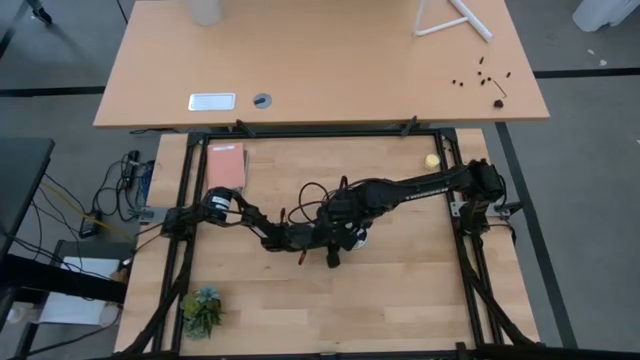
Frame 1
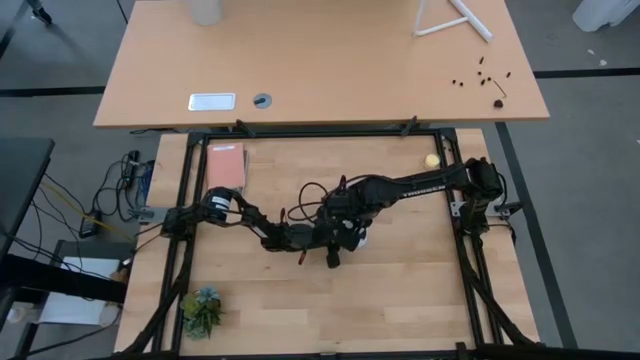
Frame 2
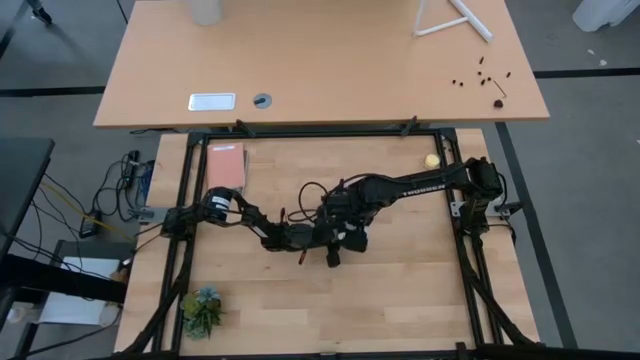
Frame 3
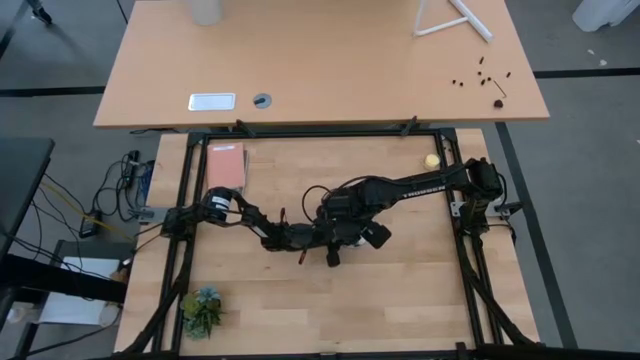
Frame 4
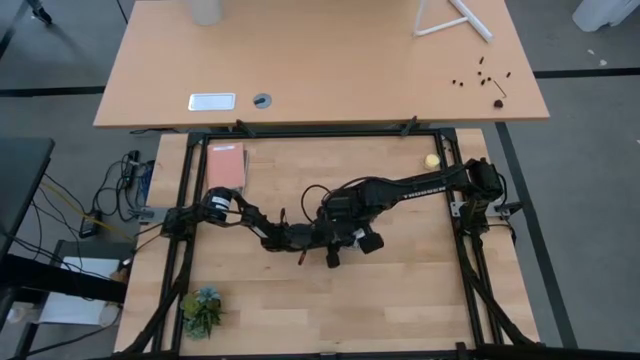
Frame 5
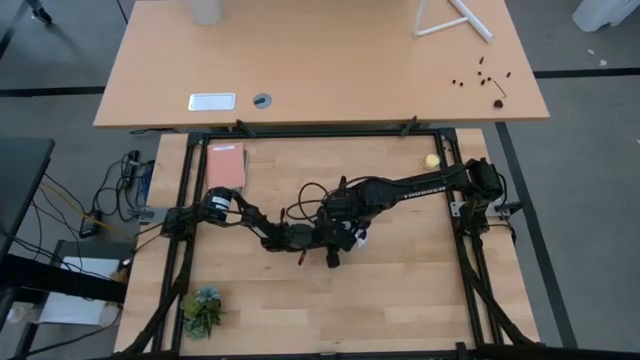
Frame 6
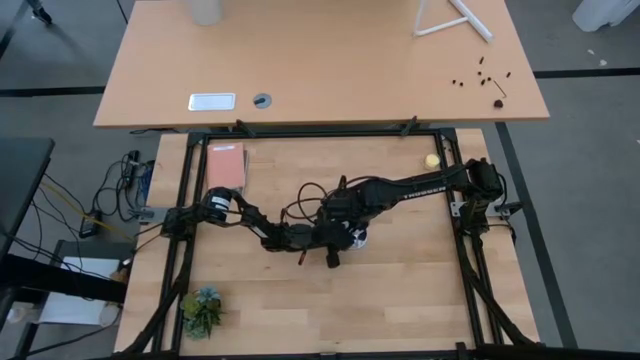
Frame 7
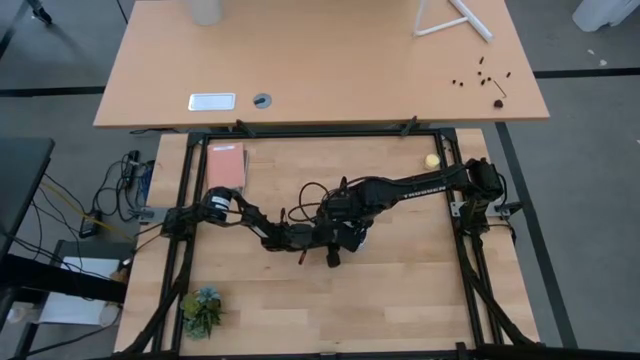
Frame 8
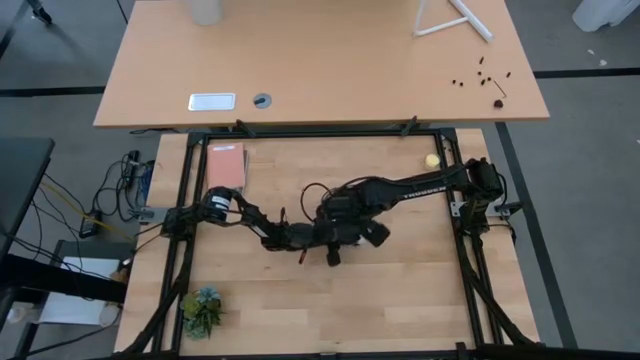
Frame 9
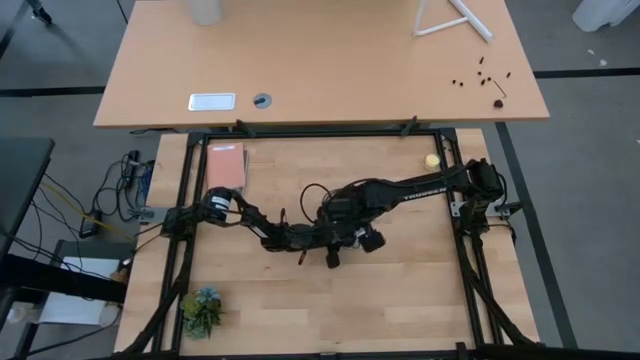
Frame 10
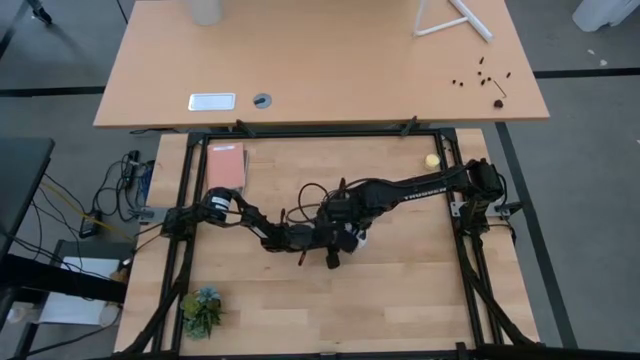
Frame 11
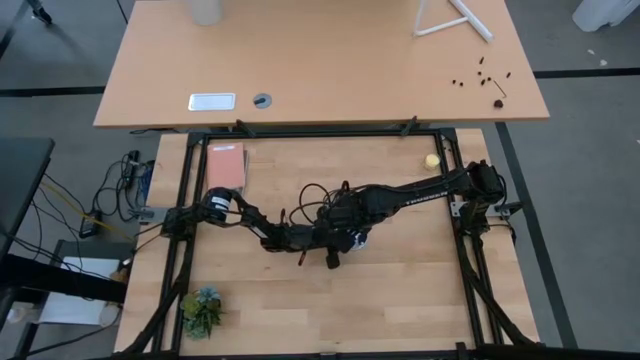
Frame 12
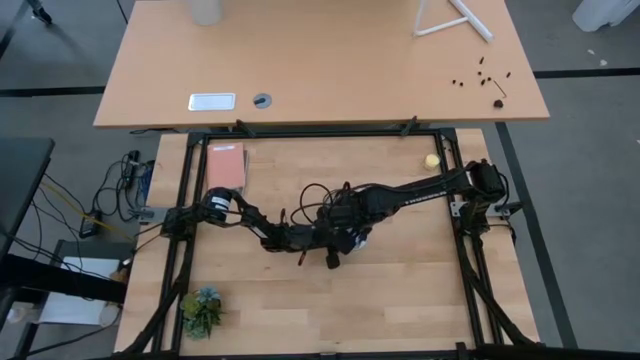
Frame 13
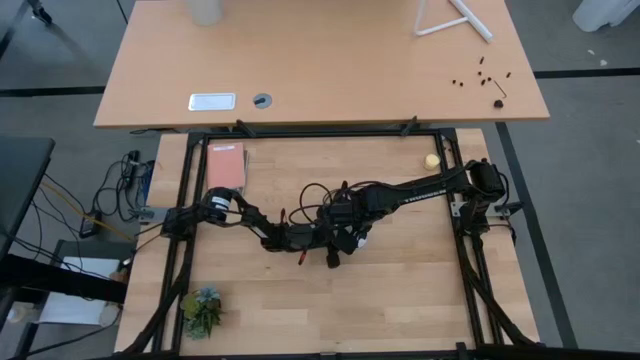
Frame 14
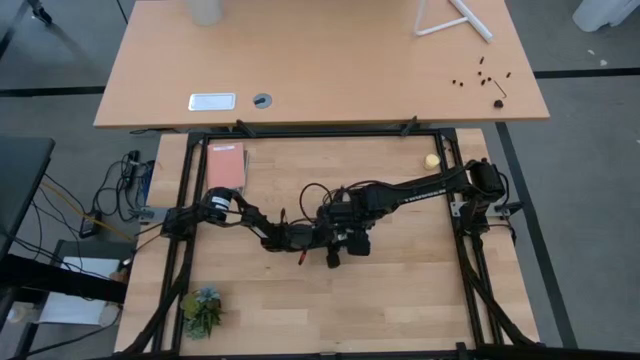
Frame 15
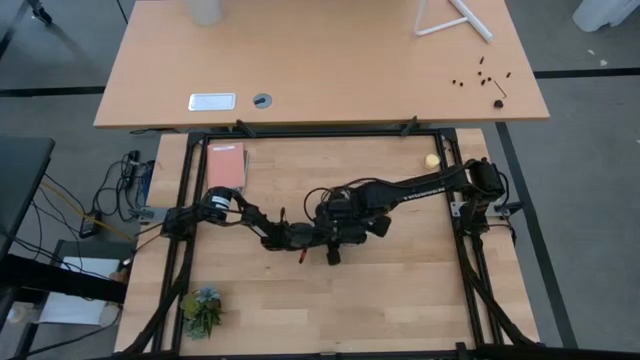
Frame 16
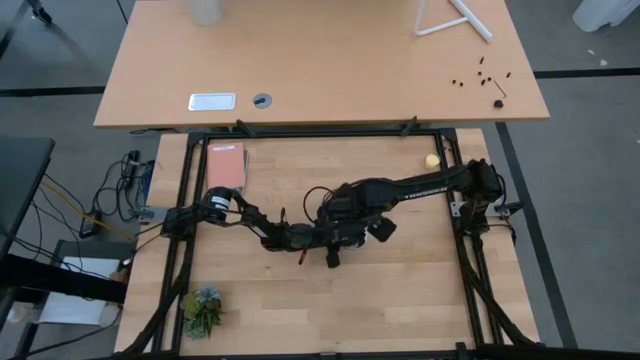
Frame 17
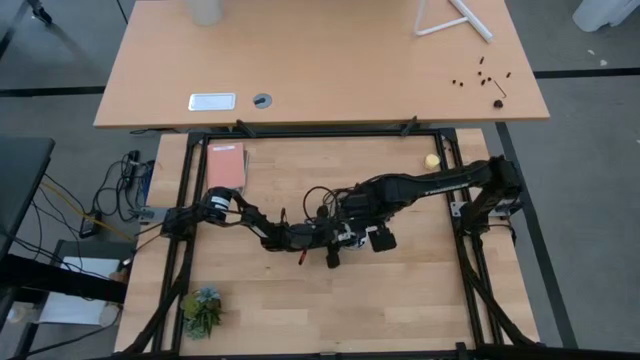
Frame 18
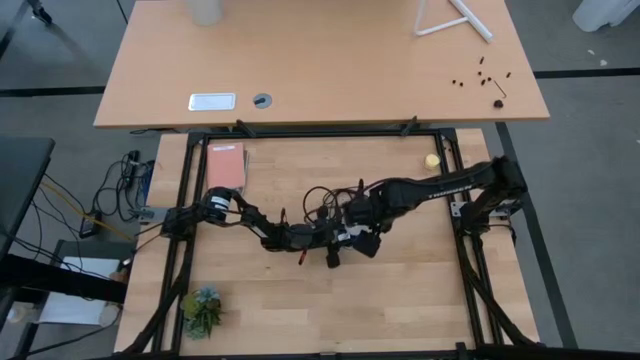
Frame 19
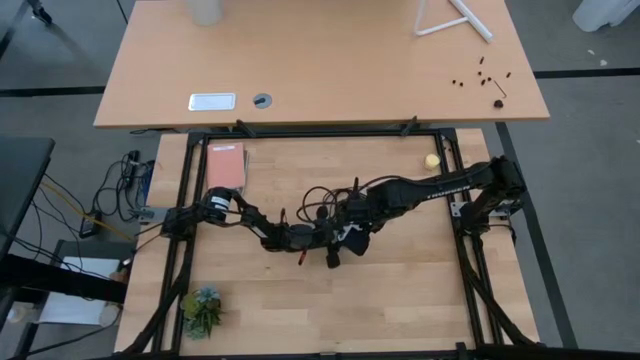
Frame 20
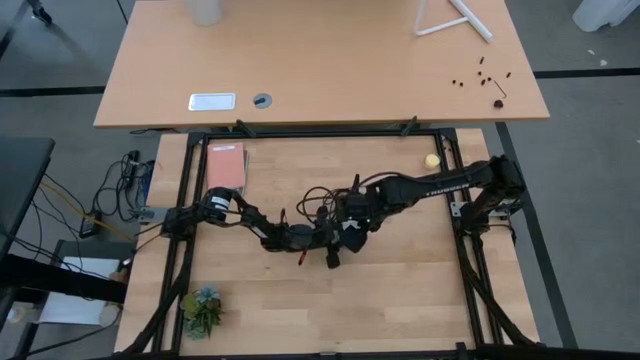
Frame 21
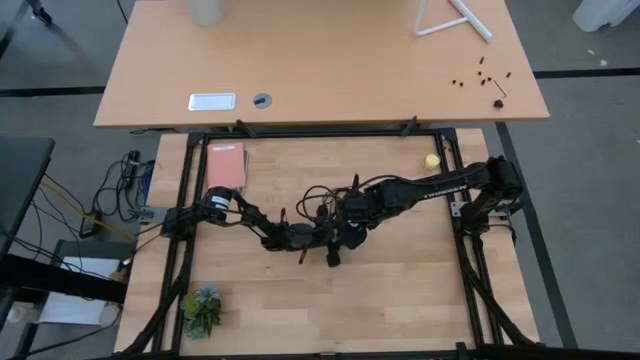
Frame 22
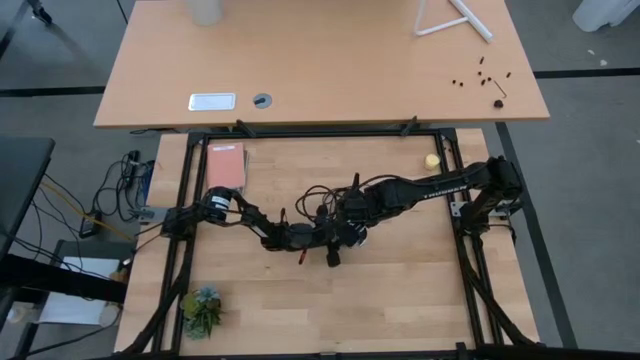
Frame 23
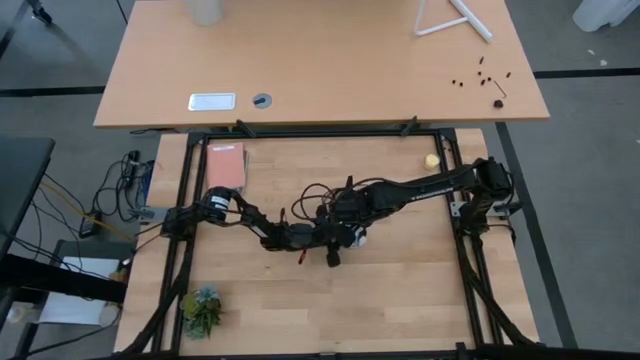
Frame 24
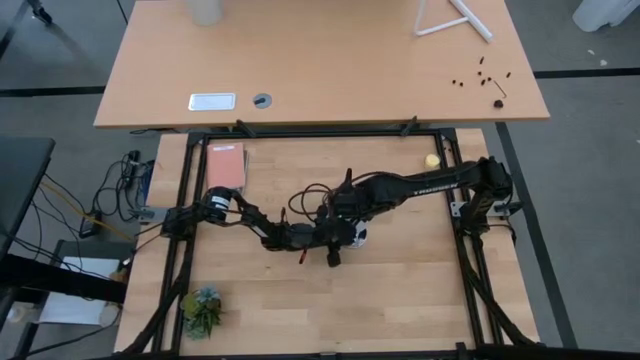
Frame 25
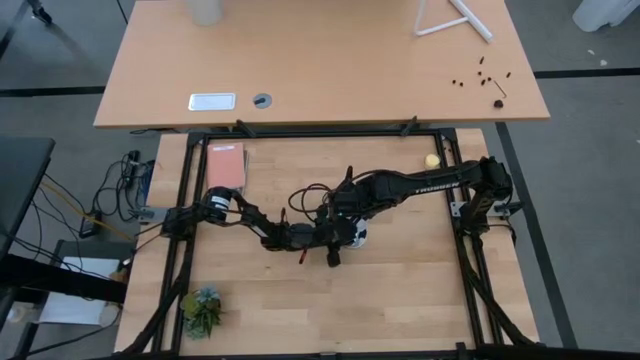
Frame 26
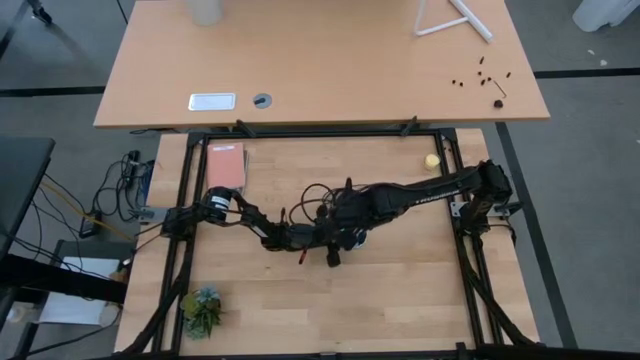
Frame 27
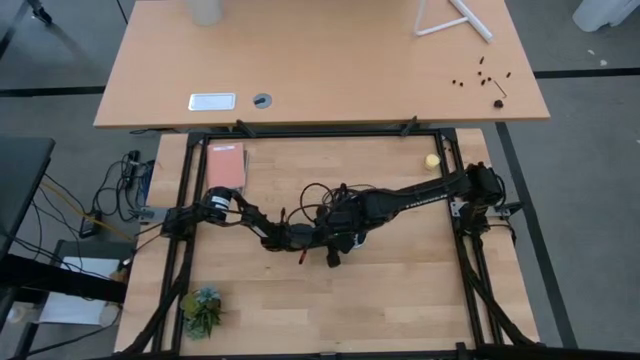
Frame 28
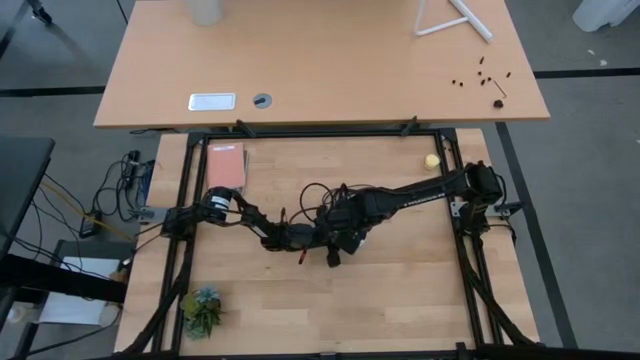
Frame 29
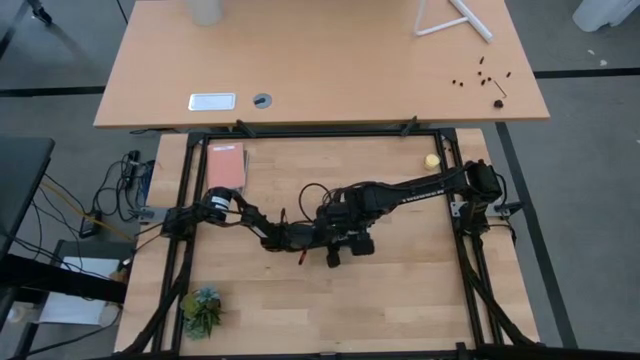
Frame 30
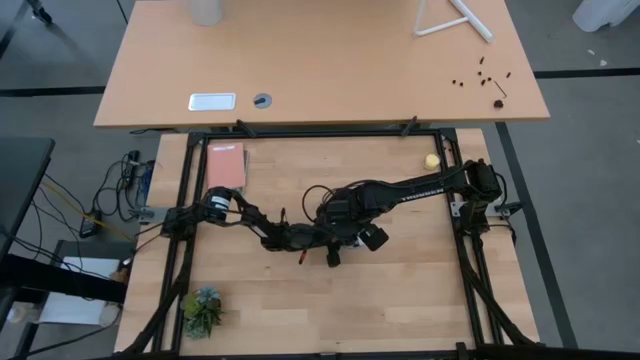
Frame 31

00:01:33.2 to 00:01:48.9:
Task: Screw lightbulb
Remove the lightbulb from the socket

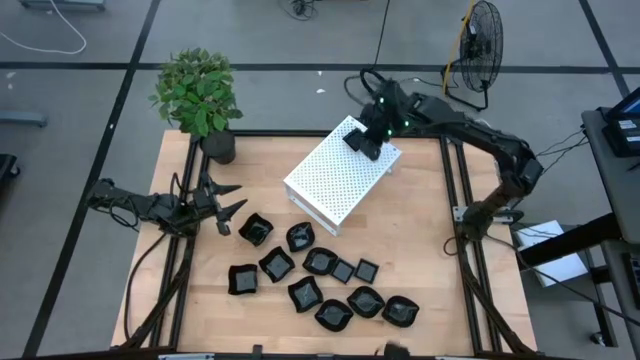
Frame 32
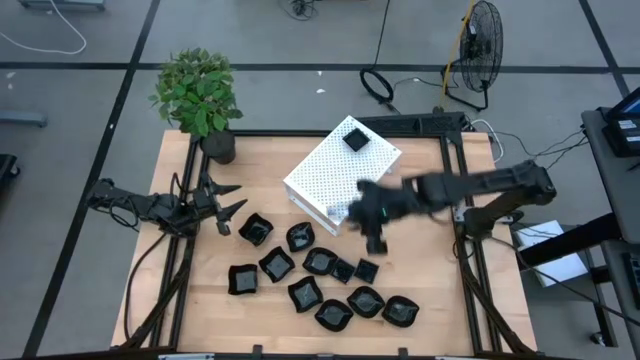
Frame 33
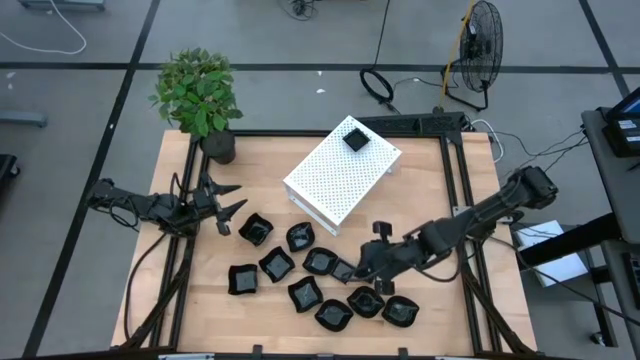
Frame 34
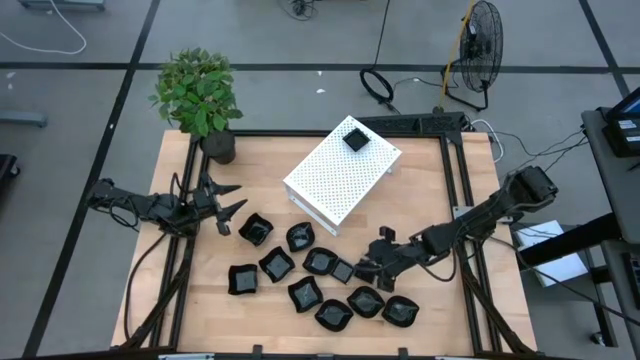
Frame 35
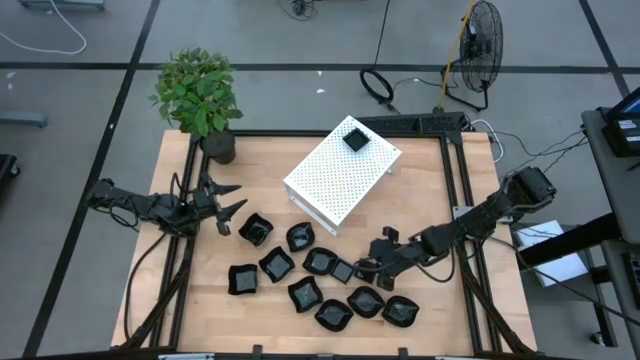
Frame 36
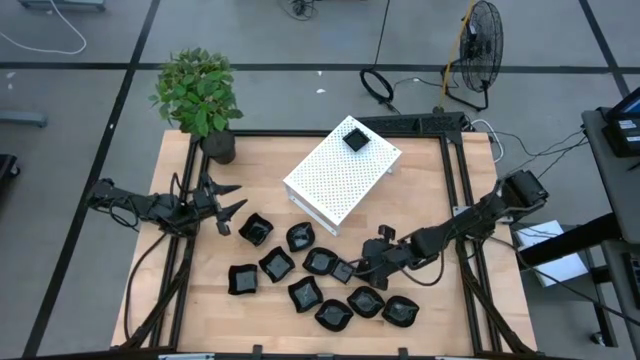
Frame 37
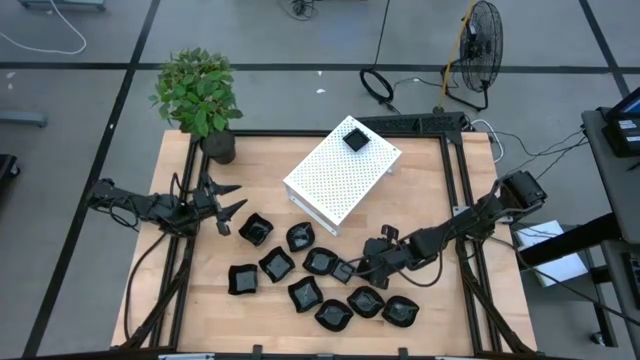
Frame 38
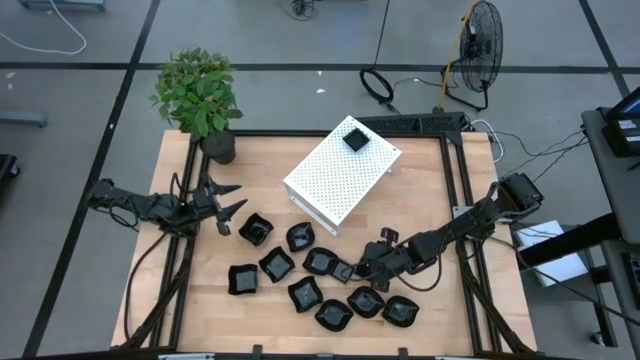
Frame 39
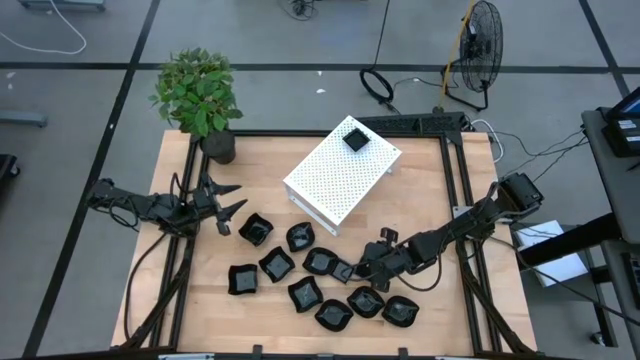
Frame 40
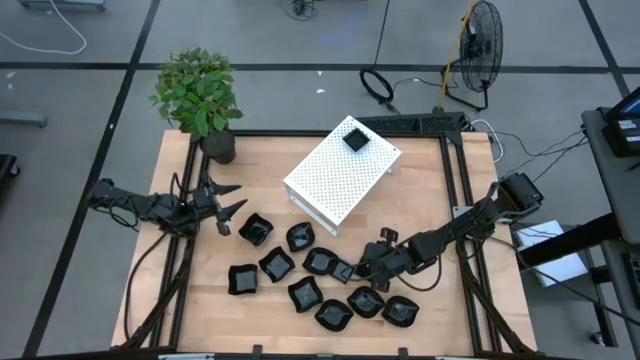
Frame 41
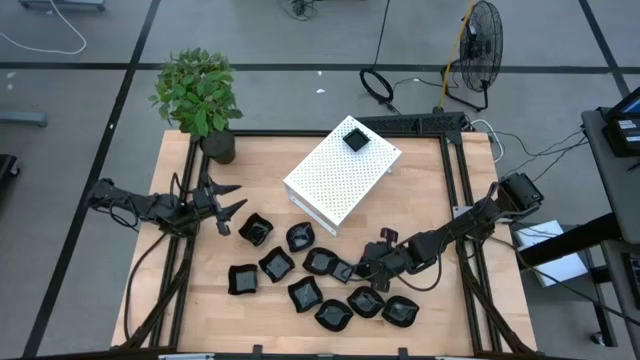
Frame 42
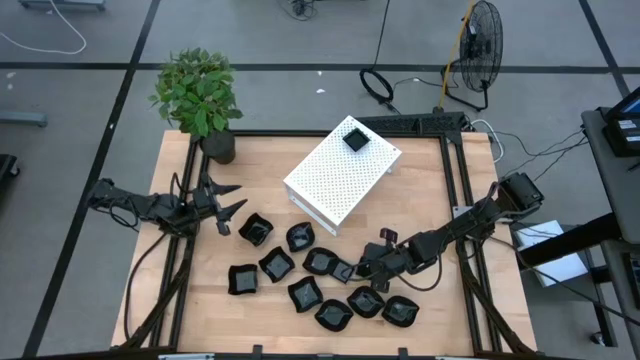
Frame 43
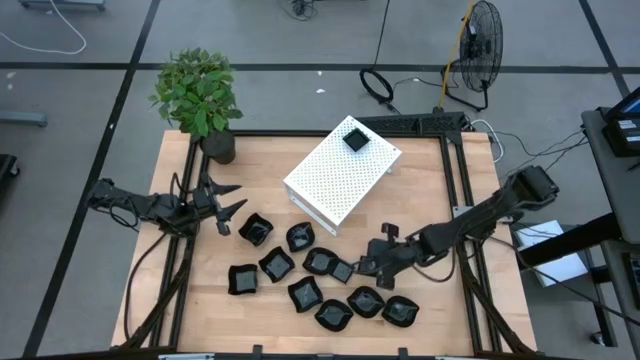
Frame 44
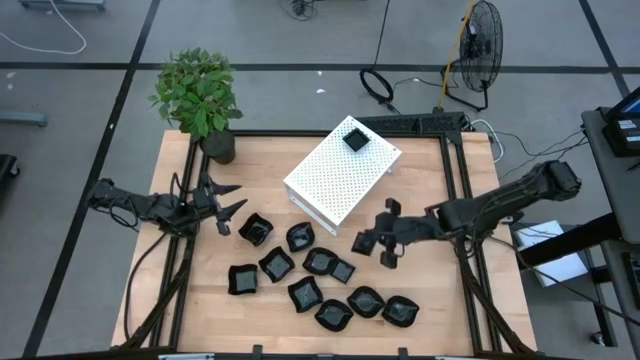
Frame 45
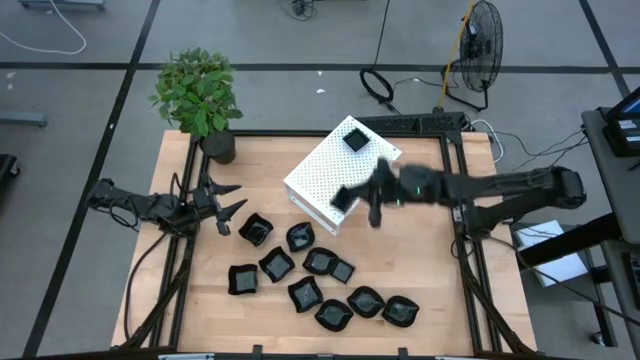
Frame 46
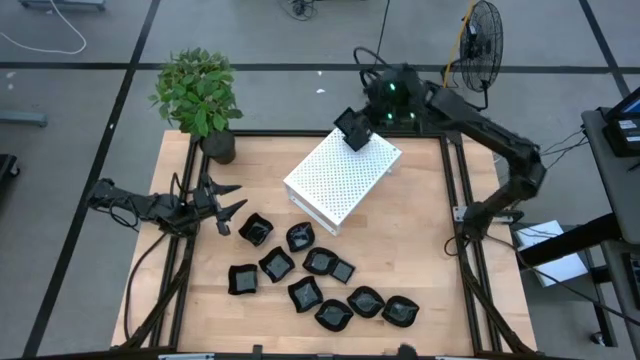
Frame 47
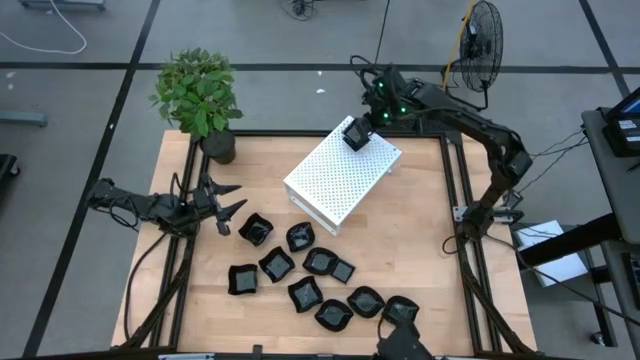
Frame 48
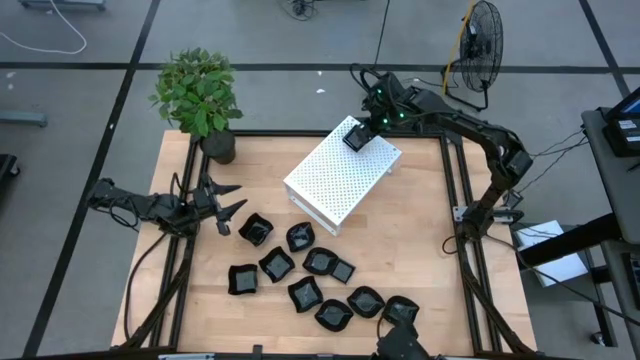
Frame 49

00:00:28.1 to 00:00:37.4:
Task: Pick & Place Mini shaped plates
Stack the black square plate on top of the black square plate on the shelf
